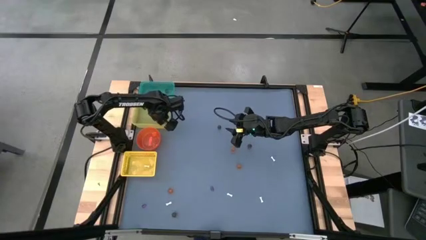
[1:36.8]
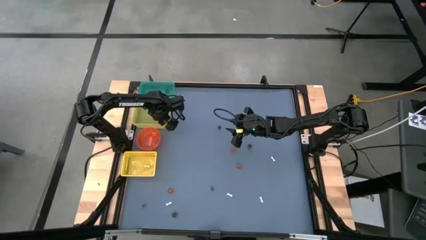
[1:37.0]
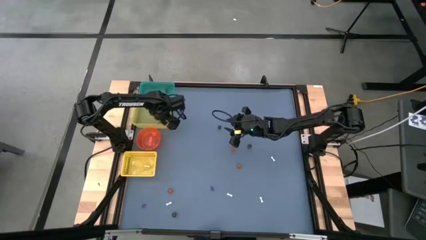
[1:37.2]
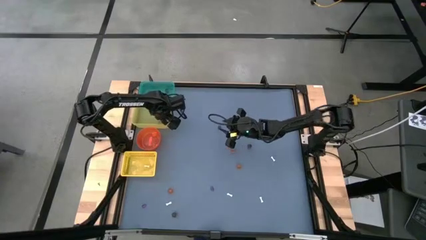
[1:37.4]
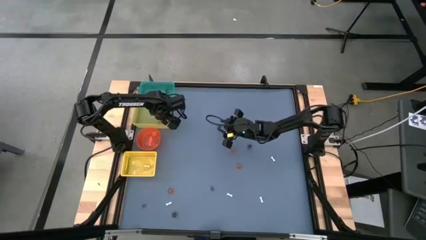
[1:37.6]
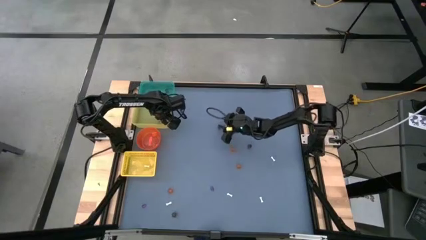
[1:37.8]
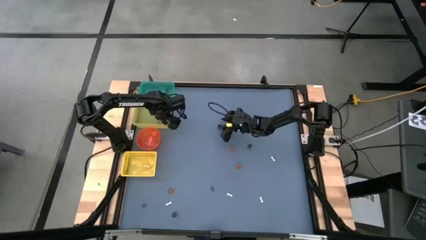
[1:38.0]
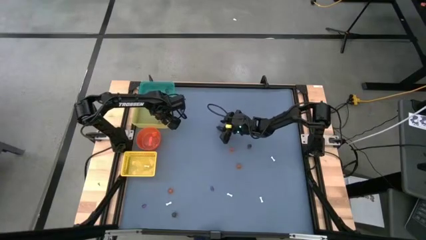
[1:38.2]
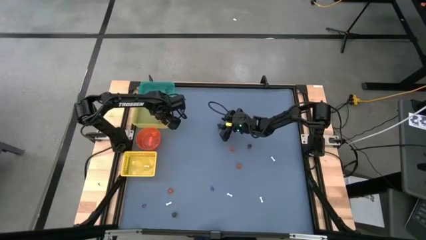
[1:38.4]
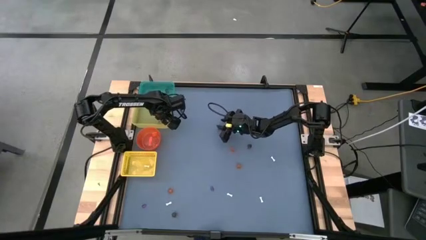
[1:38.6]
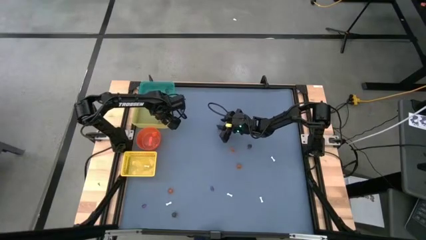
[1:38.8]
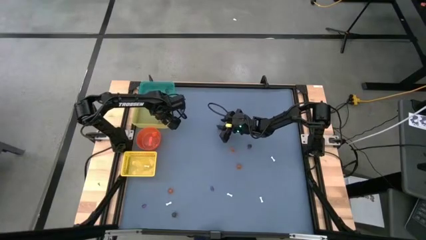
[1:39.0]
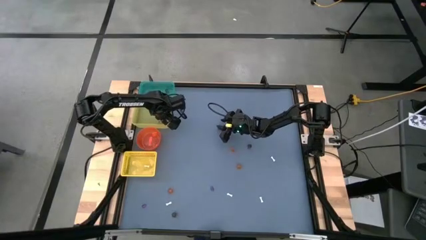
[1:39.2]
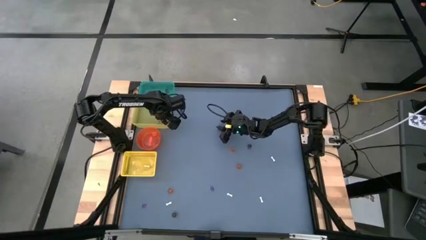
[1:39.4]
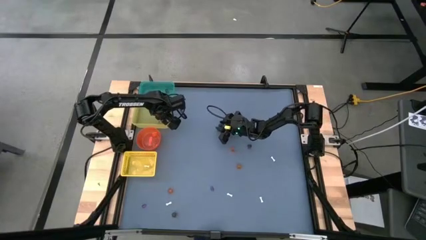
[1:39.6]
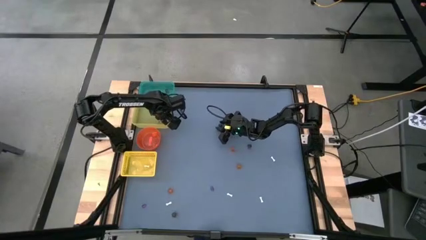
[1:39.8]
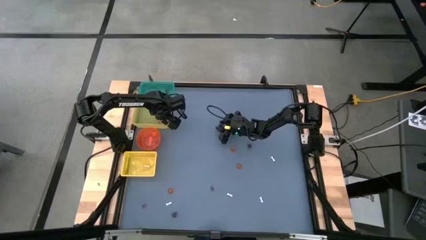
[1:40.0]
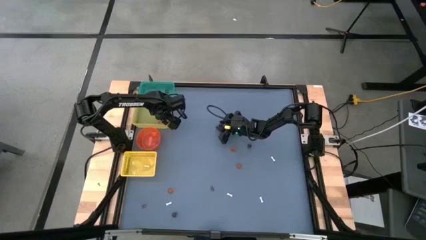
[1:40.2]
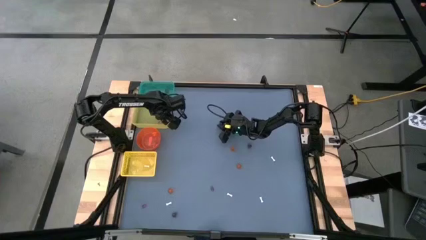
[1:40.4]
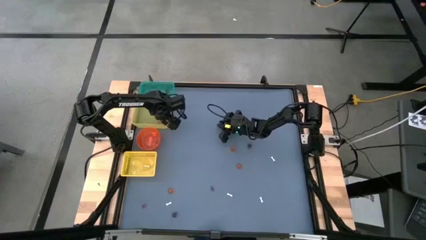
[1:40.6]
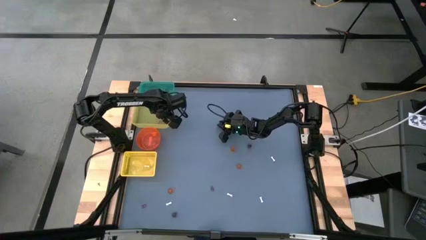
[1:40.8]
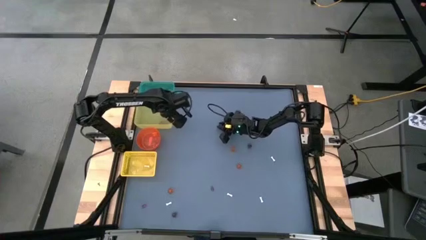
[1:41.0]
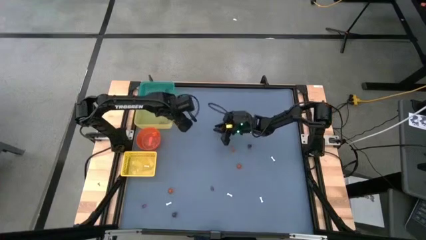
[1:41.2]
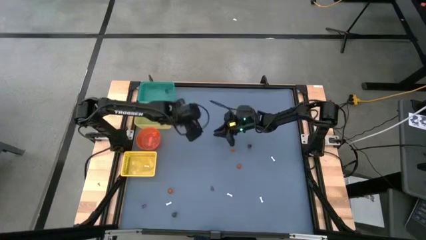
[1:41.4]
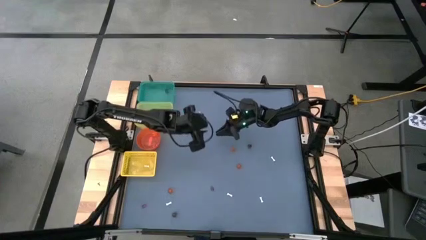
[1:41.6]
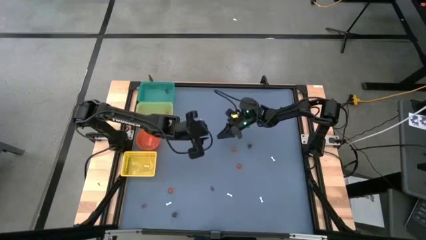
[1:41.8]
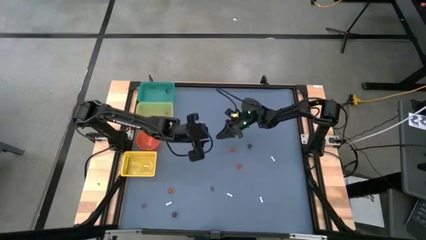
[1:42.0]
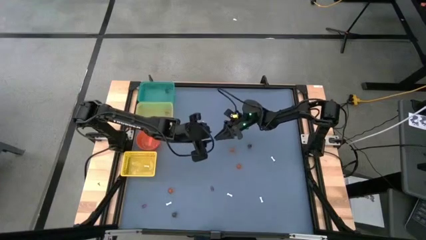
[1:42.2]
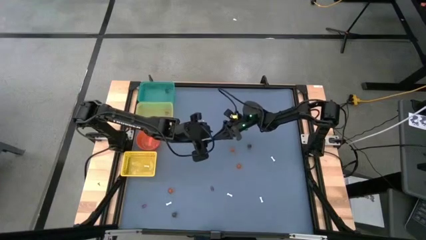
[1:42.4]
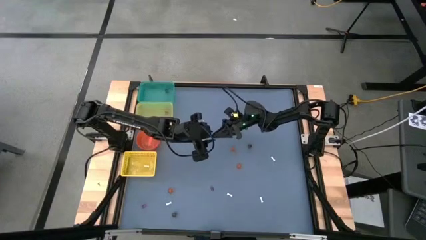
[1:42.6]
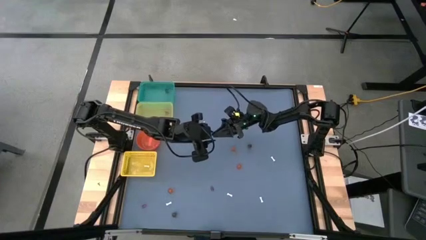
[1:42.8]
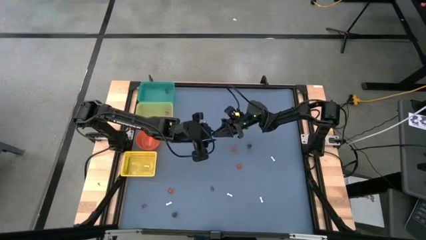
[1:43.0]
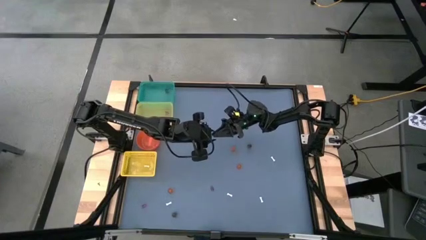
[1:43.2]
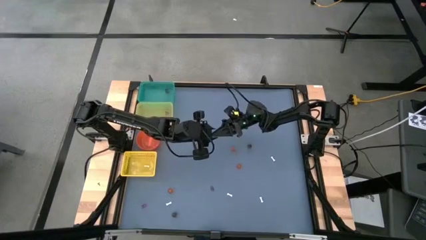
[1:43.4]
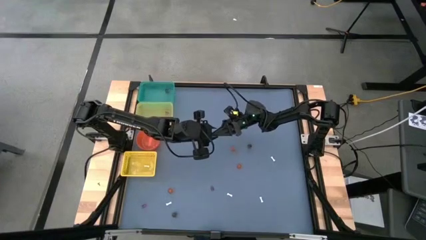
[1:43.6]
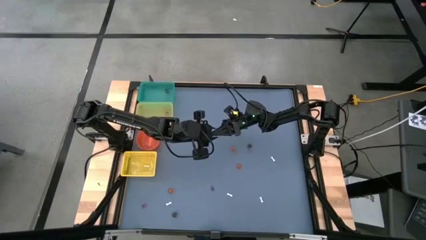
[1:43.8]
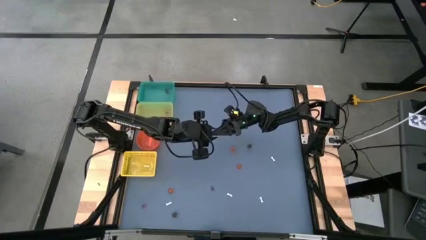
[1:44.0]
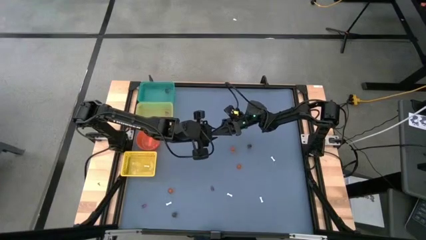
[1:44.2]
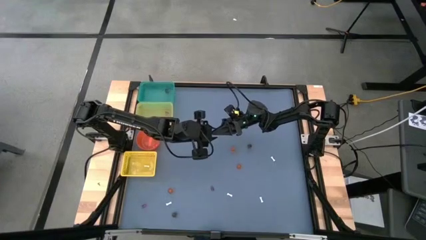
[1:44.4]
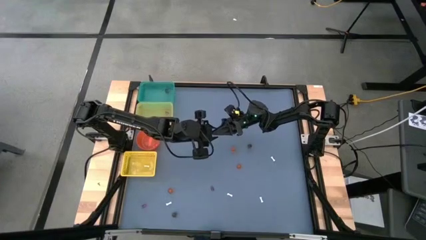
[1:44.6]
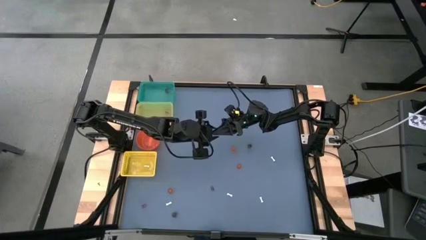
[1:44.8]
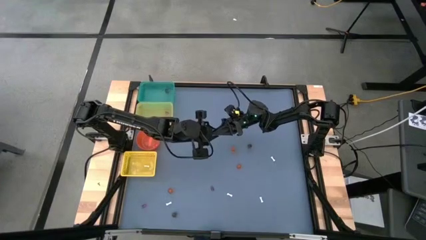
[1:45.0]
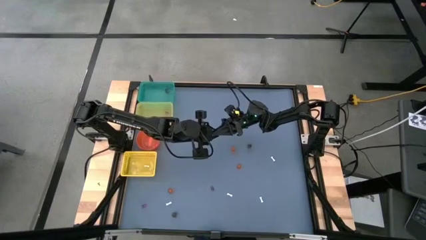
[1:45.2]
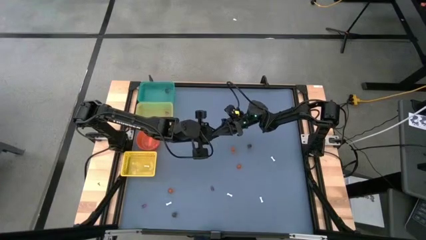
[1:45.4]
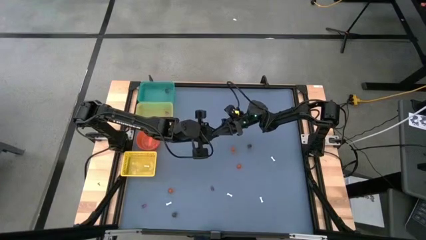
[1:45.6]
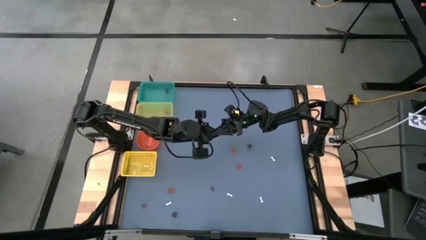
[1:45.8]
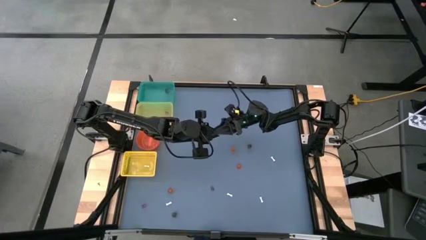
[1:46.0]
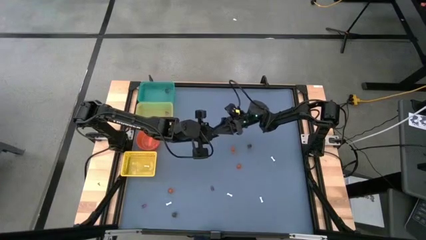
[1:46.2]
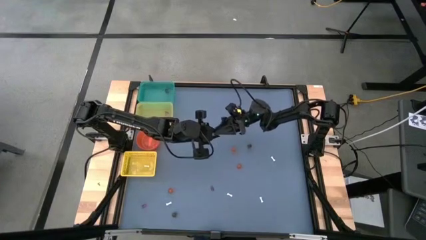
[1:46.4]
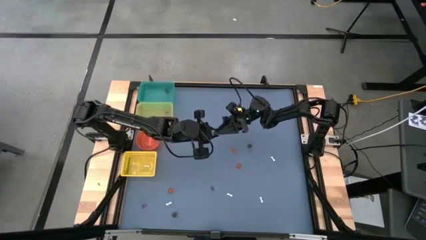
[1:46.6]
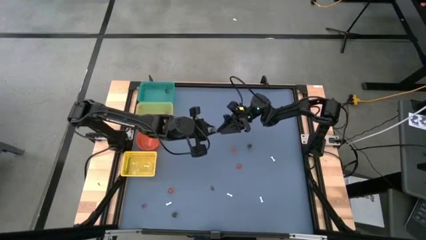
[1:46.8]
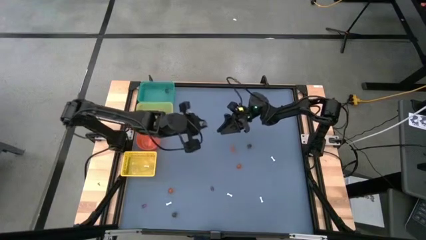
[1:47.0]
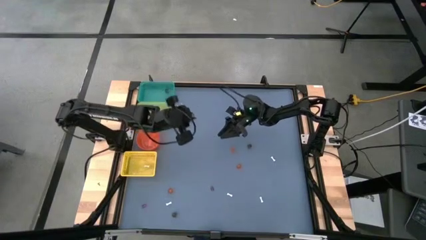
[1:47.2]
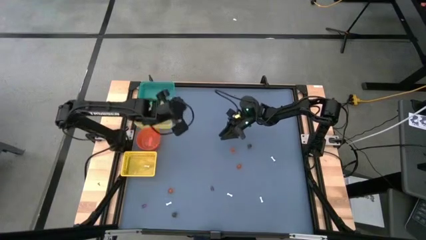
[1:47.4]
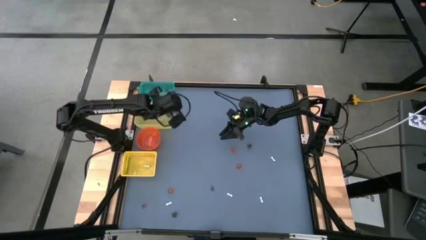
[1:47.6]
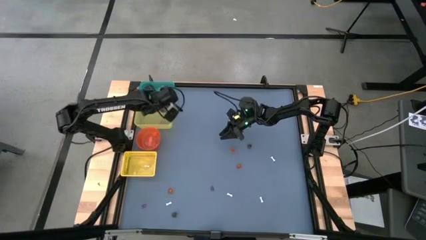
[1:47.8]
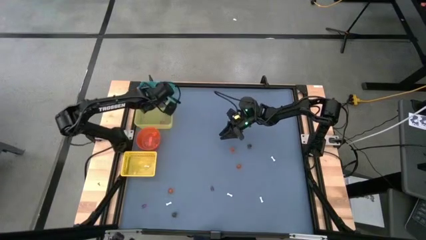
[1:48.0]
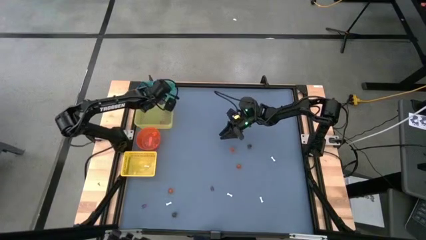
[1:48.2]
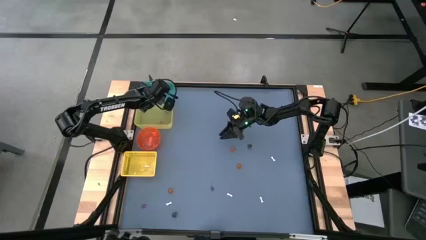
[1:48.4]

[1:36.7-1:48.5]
Task: Sort Halloween decoration
Put the top left black skull toy into the green bin

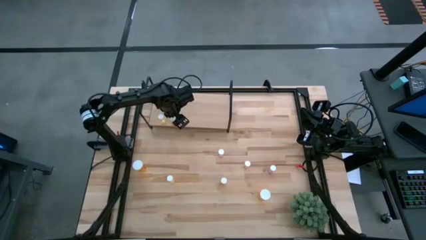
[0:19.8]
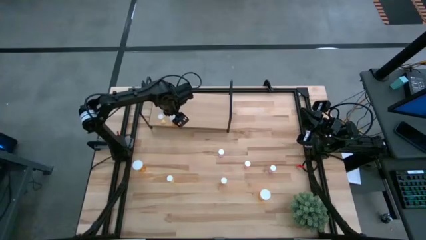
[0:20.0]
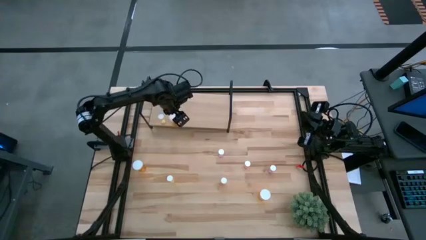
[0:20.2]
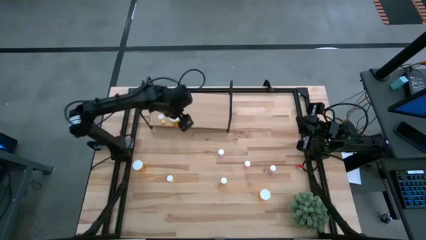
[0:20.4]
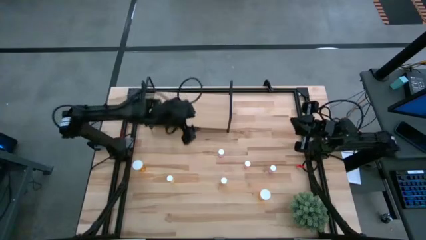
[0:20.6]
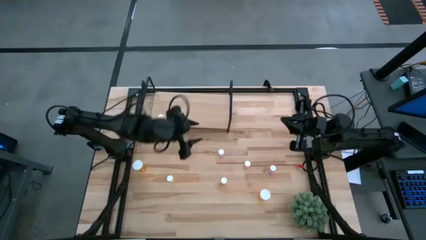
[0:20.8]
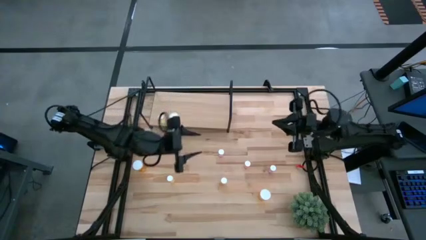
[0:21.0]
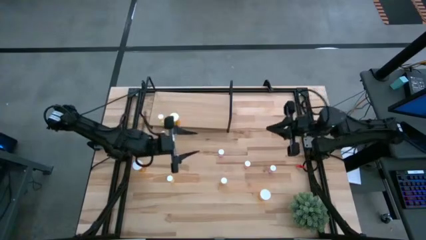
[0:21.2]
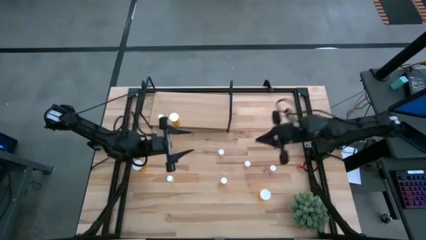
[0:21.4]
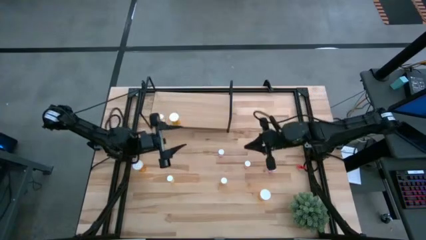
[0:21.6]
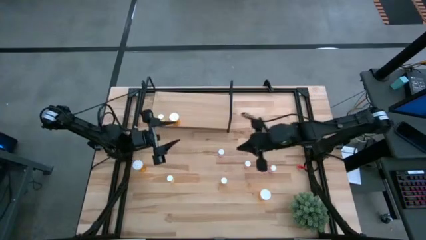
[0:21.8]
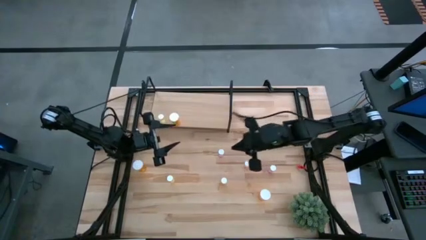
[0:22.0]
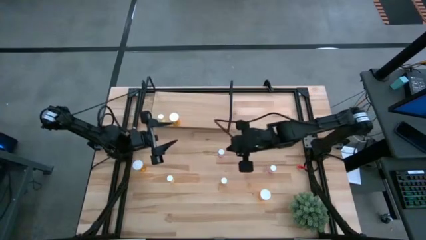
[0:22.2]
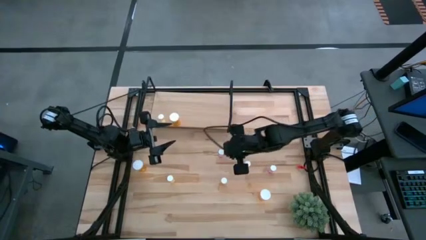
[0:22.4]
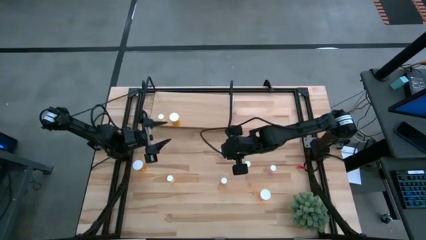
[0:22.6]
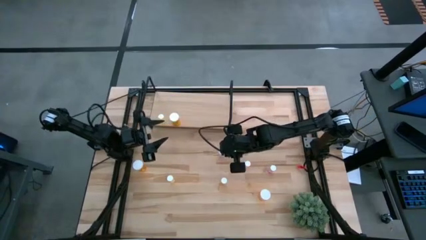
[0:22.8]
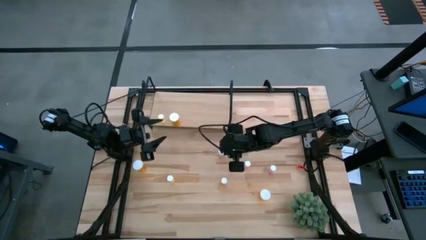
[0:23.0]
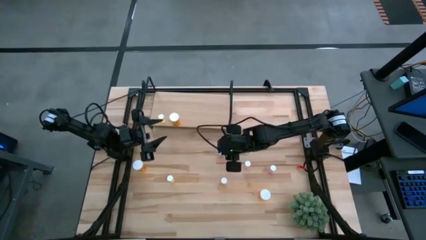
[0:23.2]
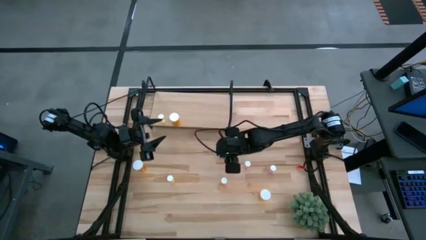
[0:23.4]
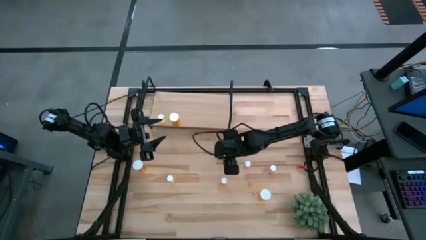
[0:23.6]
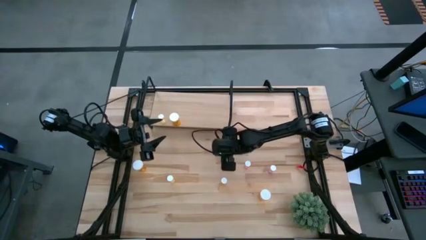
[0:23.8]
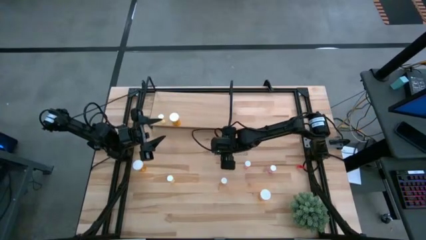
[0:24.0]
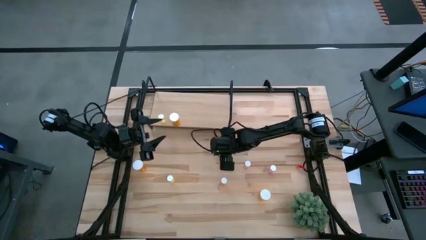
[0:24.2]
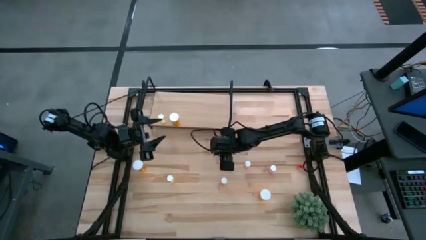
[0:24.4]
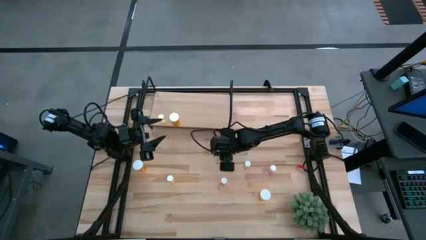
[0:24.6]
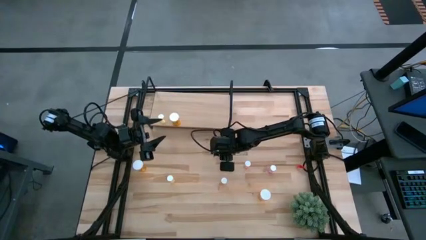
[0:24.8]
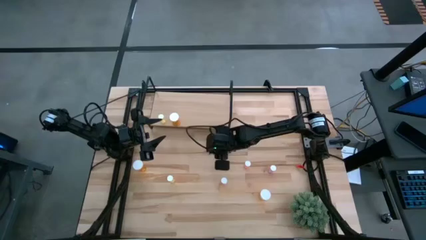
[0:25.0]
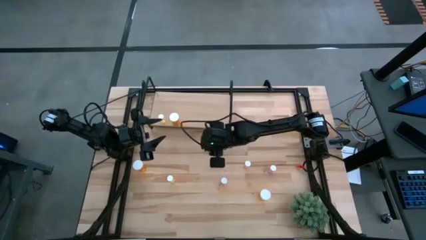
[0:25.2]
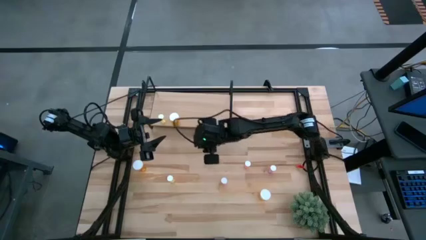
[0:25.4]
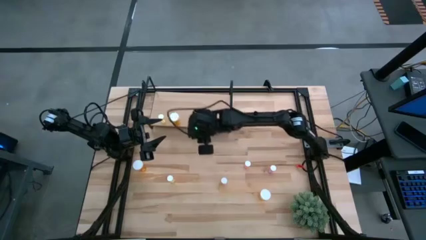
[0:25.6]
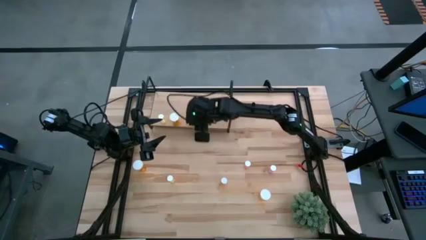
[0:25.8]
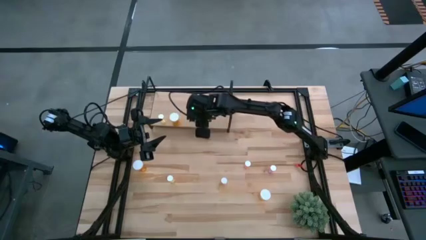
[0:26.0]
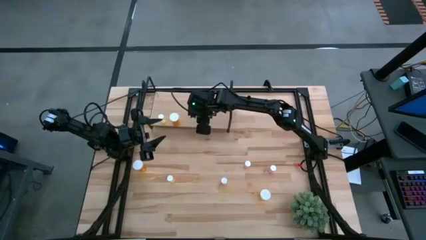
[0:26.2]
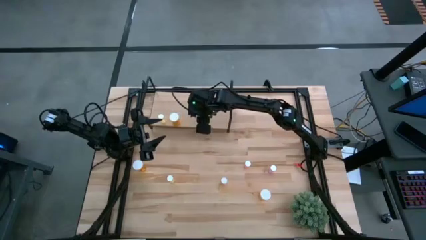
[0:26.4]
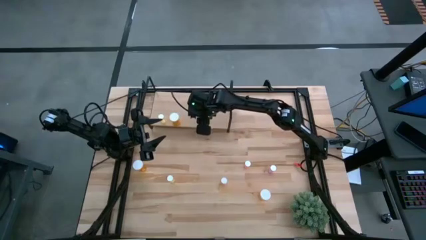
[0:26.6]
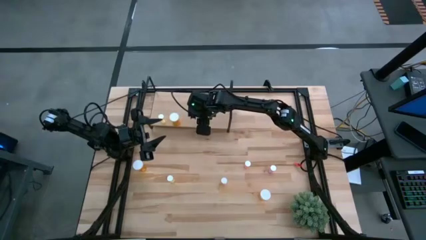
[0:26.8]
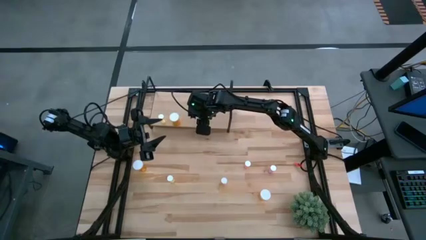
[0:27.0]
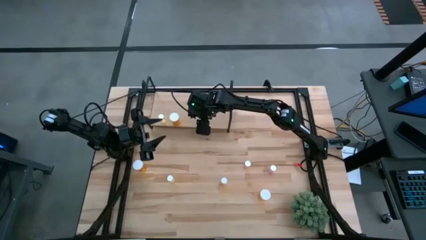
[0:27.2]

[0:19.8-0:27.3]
Task: Pick and place medicine bottles onto shelf by color
Put the top left purple pill bottle on the shelf
